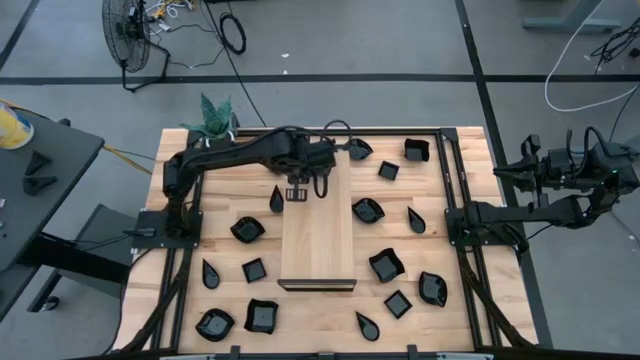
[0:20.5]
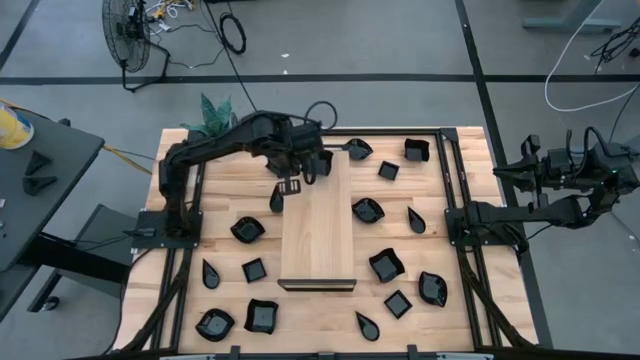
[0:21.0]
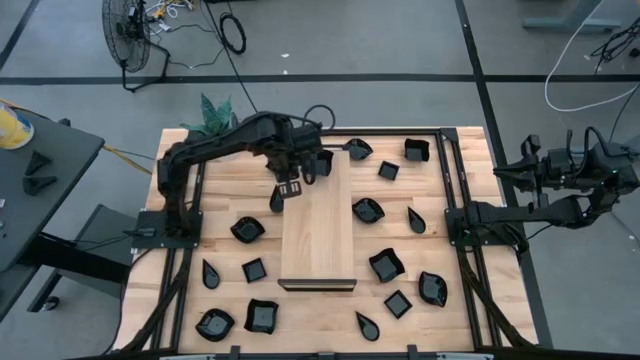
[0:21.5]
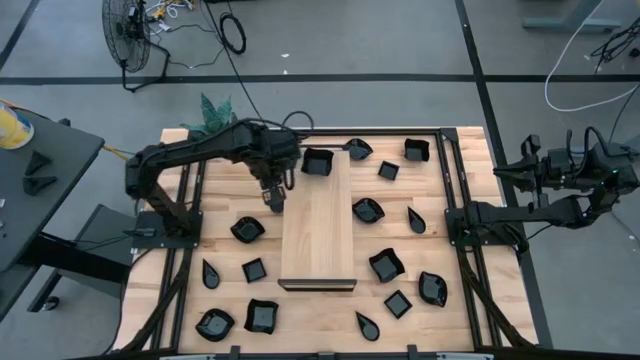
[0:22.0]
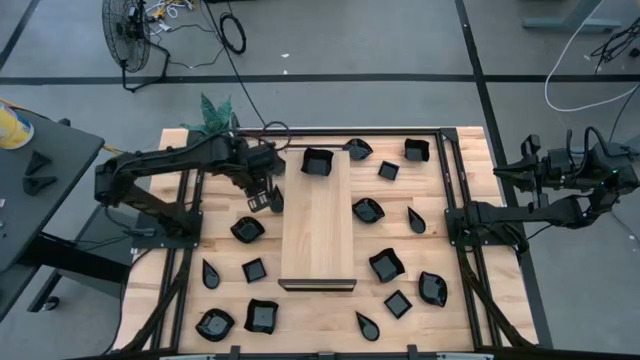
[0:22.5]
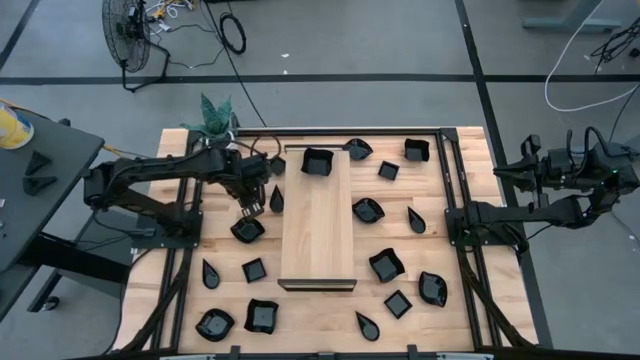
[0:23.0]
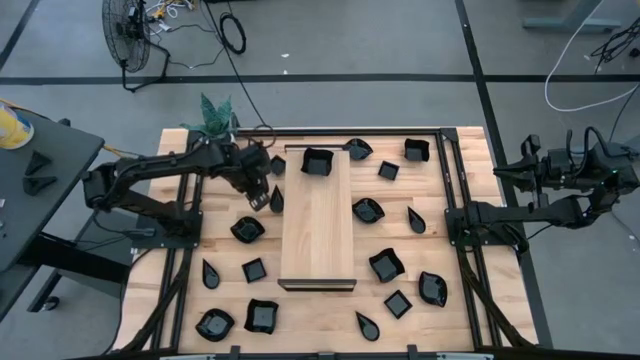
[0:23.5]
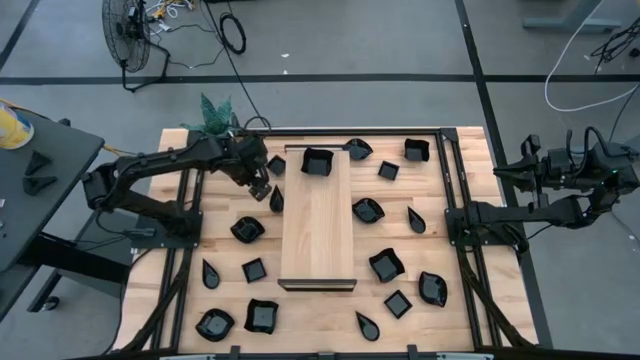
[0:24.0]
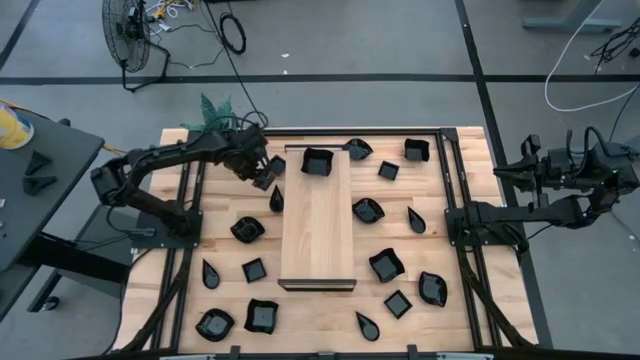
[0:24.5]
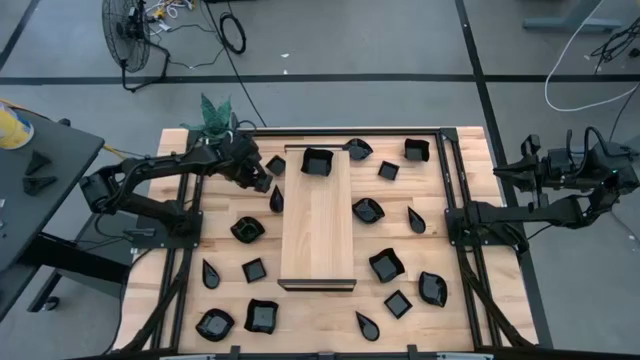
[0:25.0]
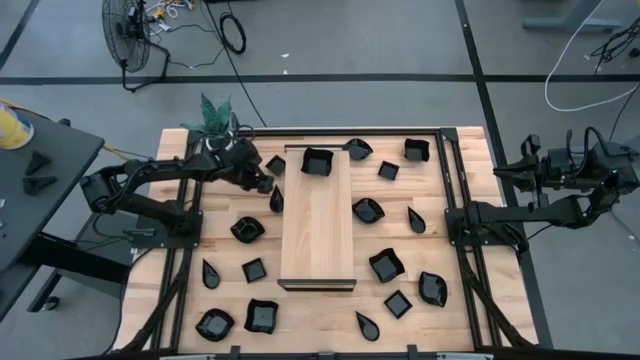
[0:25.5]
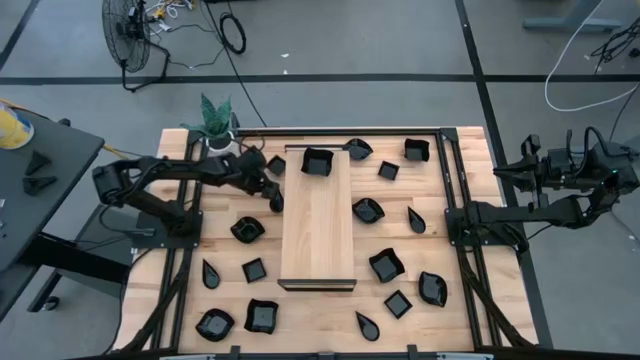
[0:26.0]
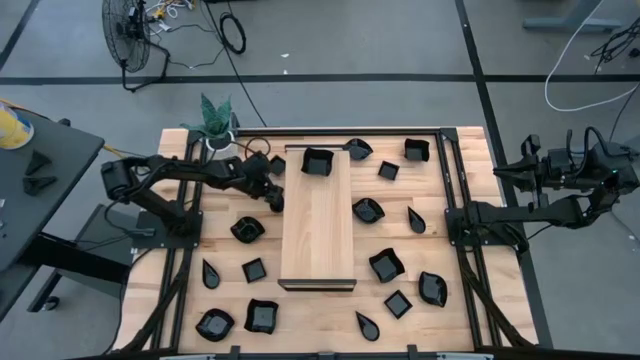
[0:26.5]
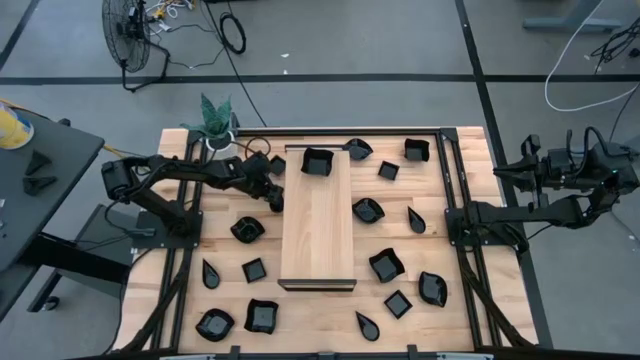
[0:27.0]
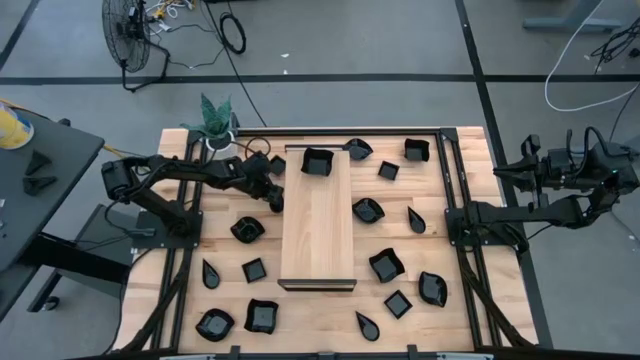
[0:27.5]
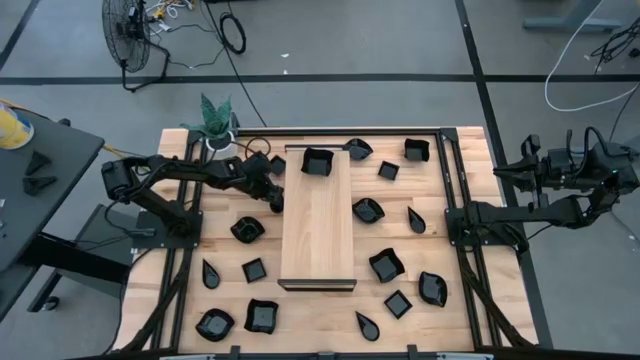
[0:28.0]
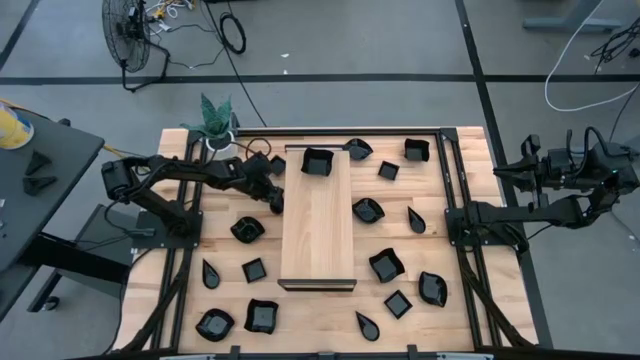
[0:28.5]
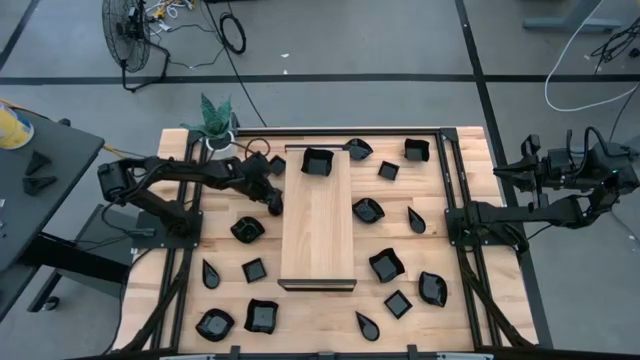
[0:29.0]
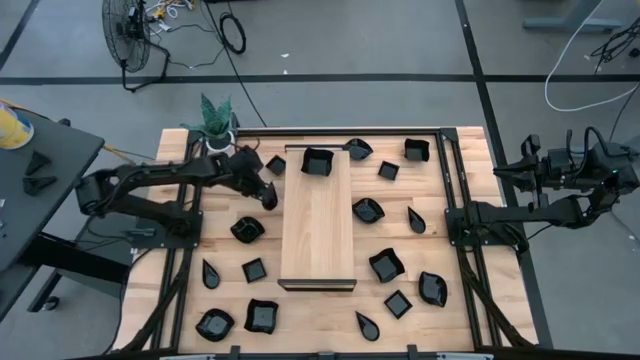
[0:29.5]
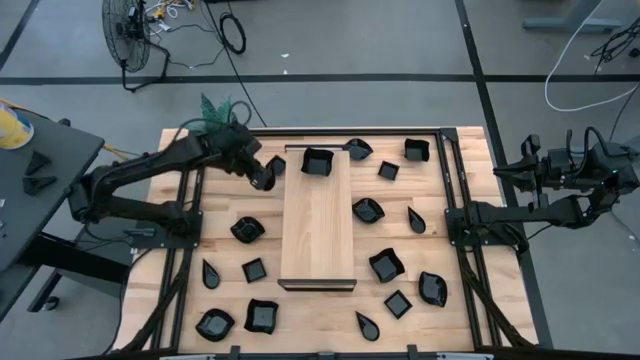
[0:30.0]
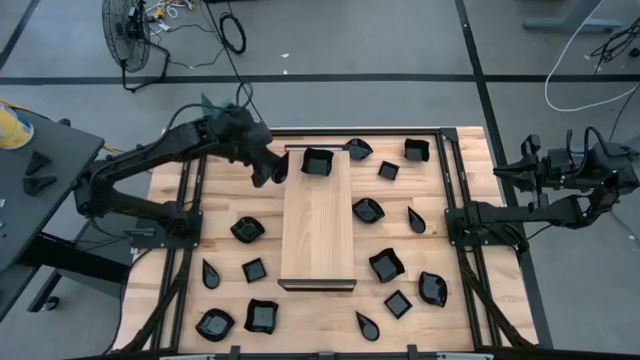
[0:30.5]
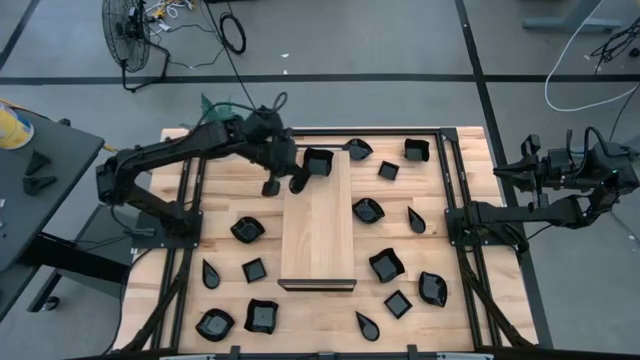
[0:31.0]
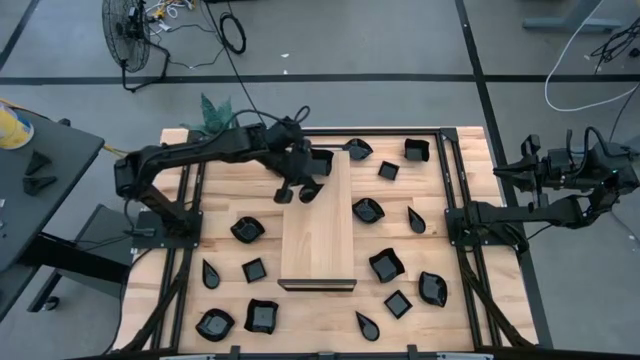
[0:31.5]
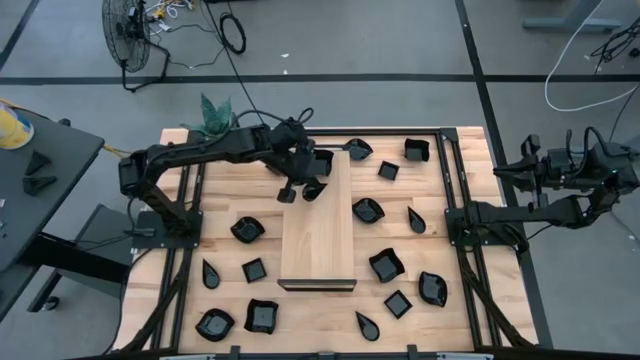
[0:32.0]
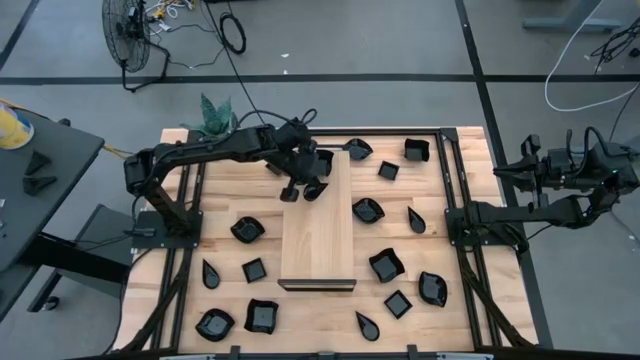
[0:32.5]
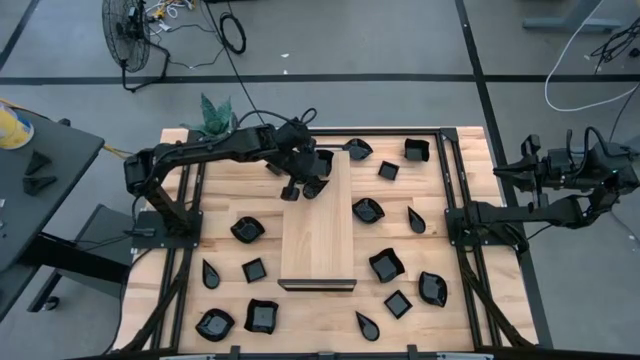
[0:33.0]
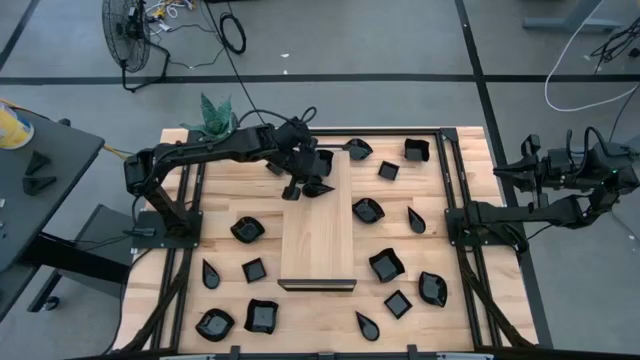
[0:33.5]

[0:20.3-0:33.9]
Task: Pick & Place Mini shaped plates
Put the drop shaped plate on the shelf

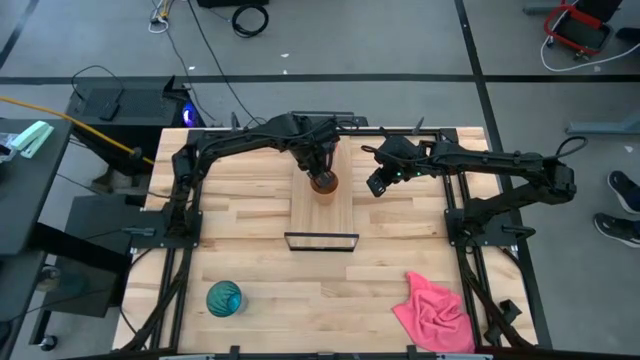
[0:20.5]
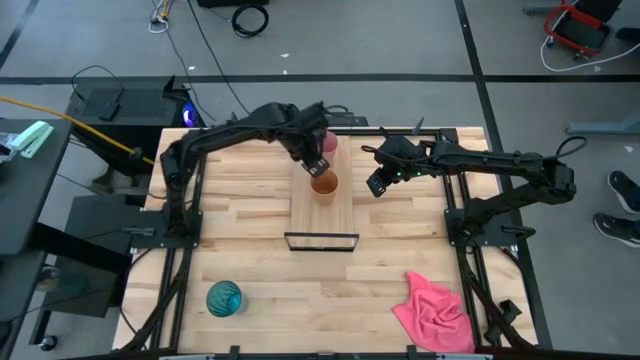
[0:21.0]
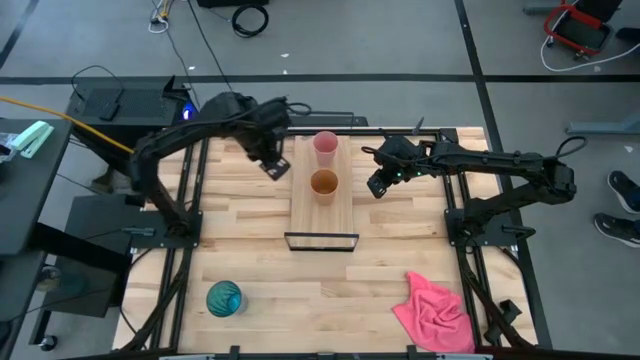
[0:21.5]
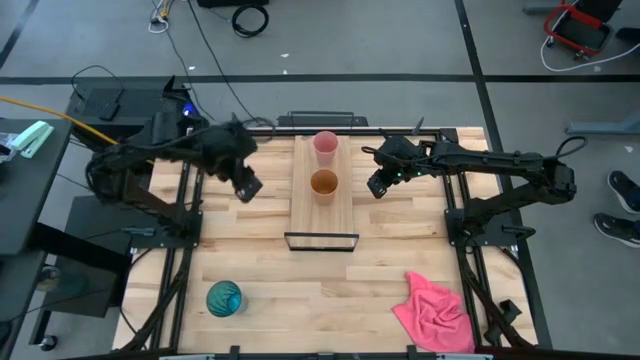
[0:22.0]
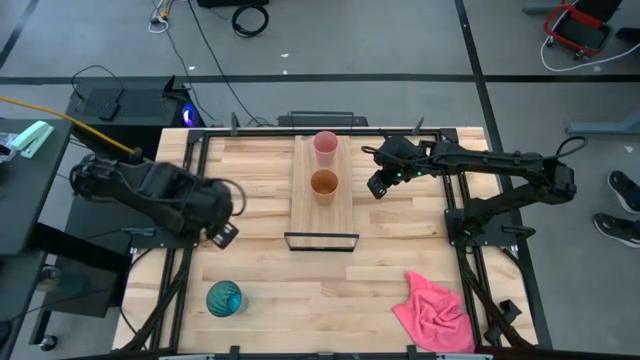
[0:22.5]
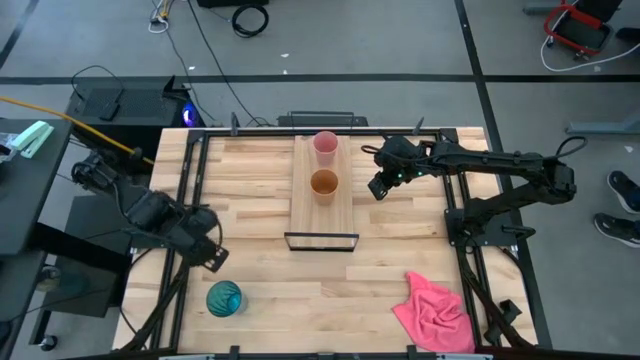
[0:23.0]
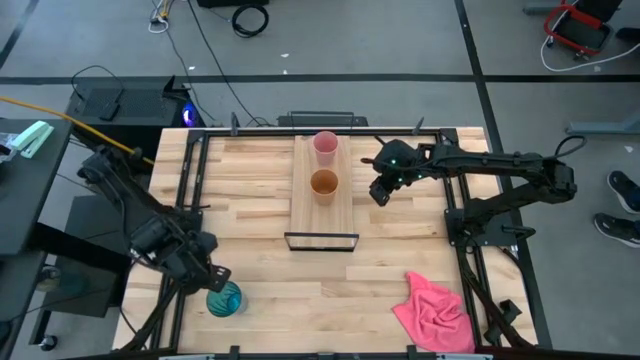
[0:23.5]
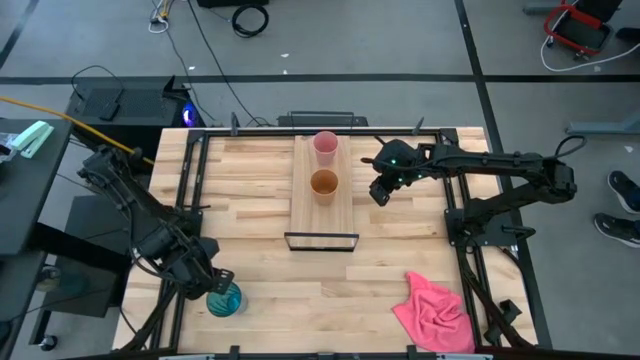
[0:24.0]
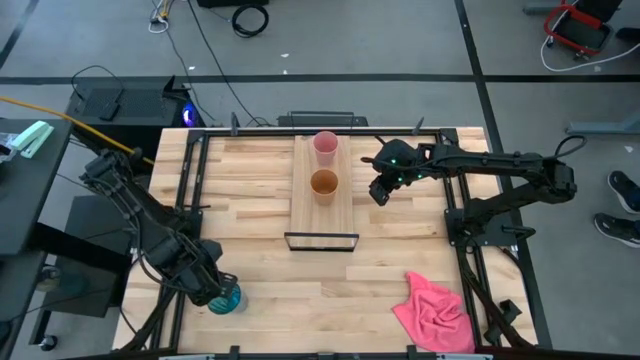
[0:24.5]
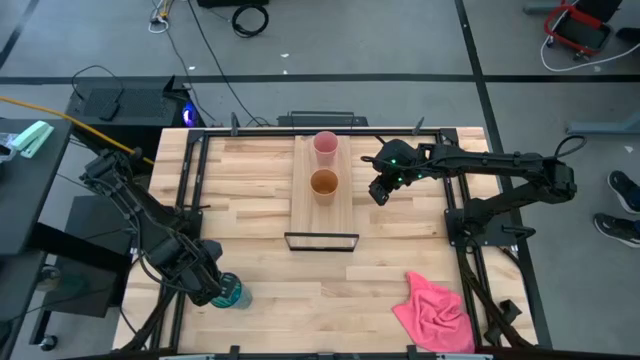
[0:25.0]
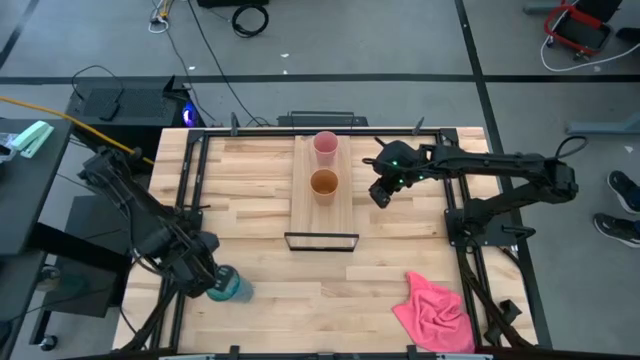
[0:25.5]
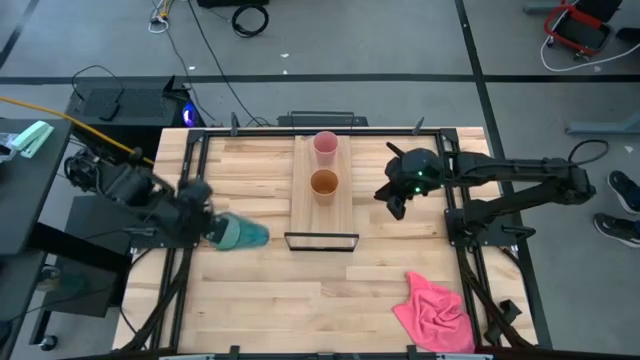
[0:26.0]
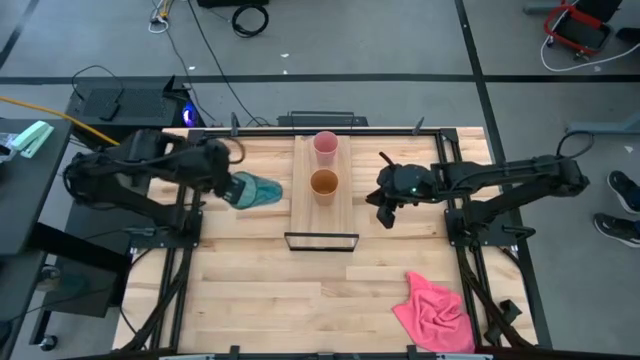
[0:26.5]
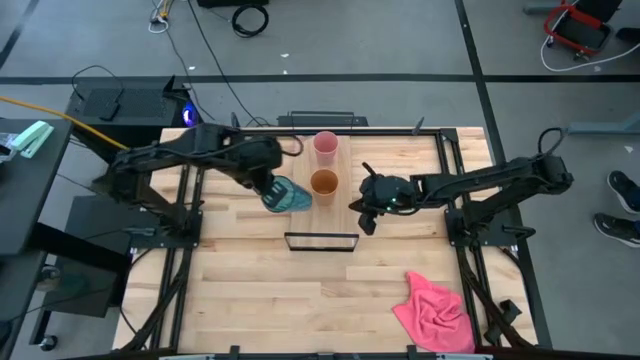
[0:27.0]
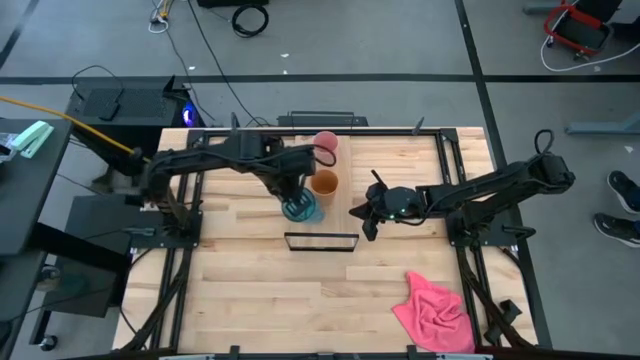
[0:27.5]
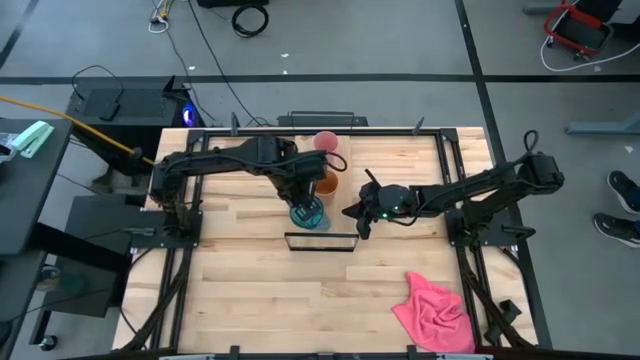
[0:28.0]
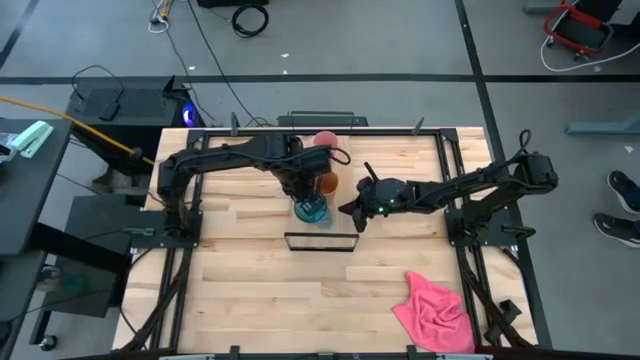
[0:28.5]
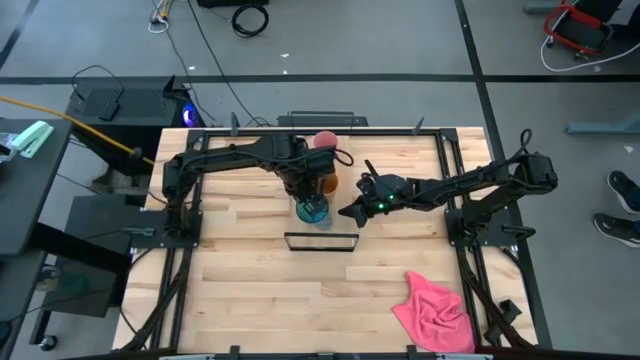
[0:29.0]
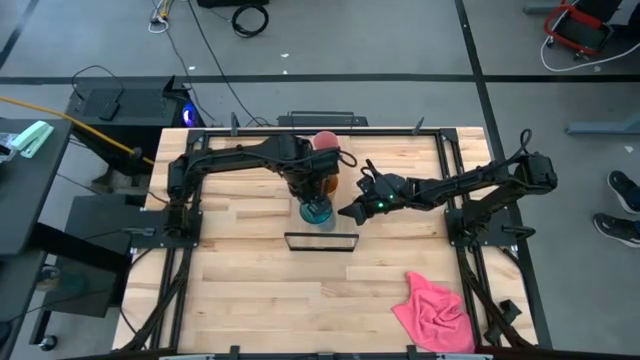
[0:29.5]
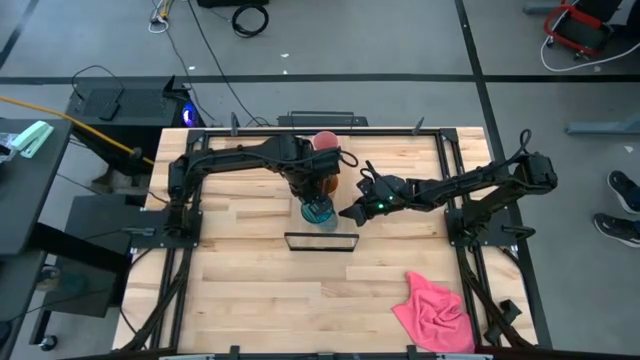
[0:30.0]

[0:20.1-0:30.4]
Task: Stack small to large cups/mugs on shelf
Put the blue glass on the shelf
